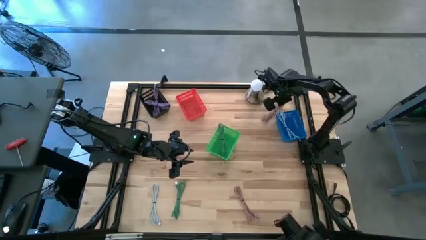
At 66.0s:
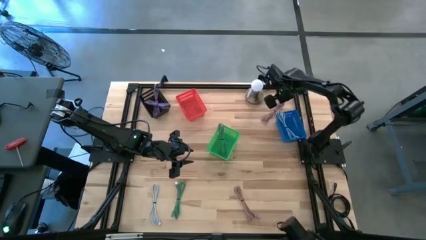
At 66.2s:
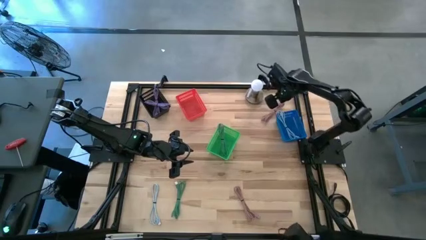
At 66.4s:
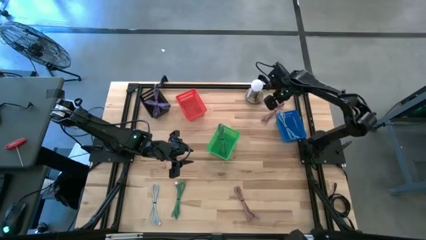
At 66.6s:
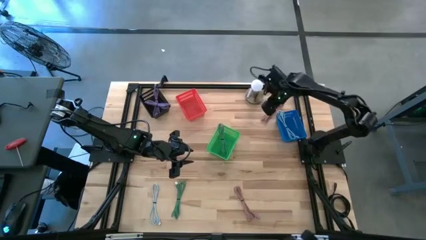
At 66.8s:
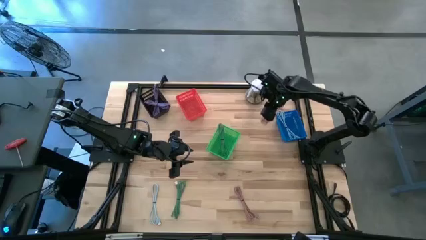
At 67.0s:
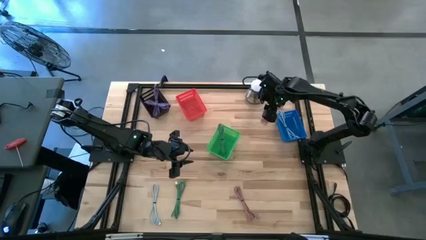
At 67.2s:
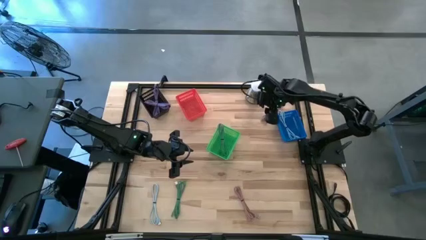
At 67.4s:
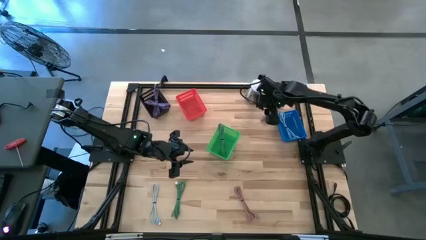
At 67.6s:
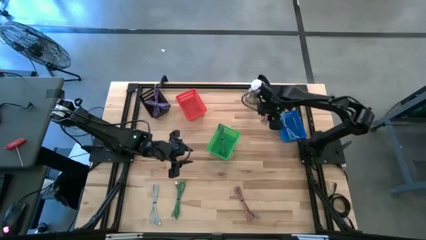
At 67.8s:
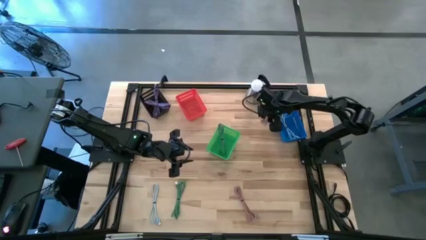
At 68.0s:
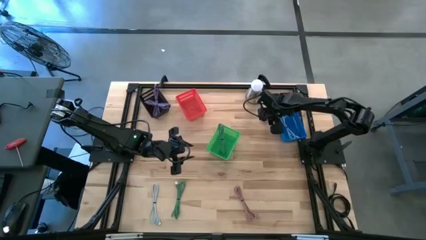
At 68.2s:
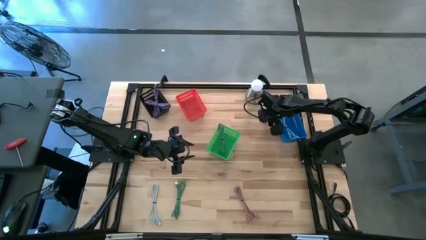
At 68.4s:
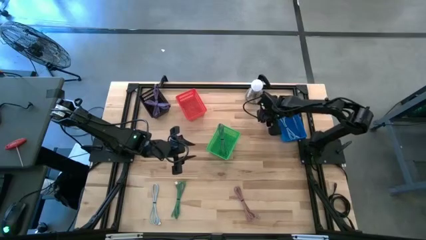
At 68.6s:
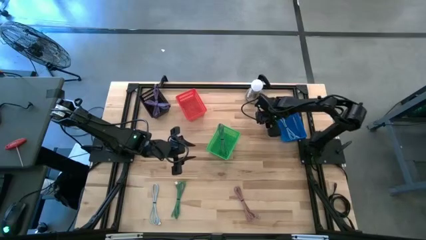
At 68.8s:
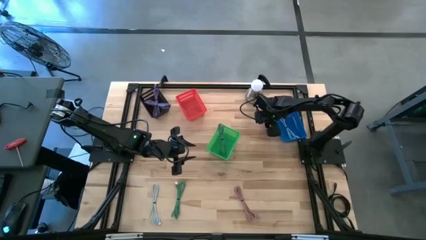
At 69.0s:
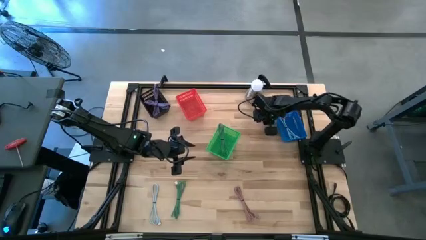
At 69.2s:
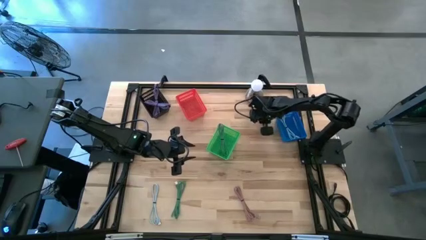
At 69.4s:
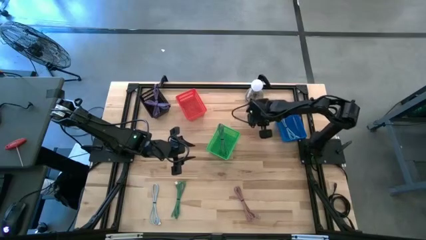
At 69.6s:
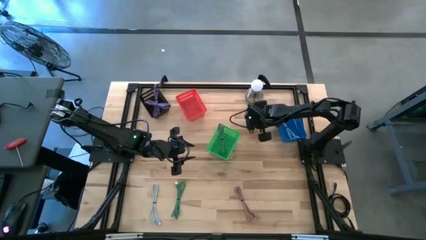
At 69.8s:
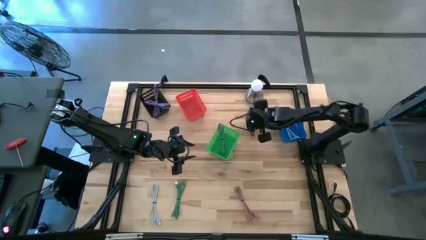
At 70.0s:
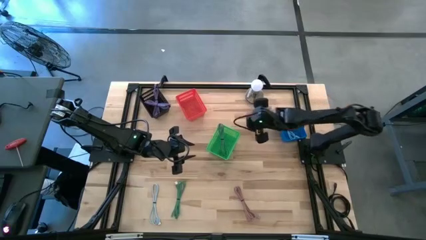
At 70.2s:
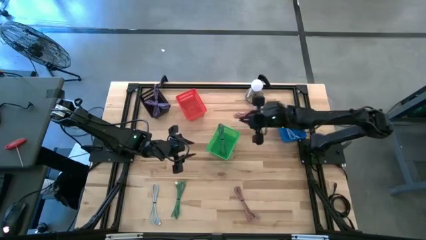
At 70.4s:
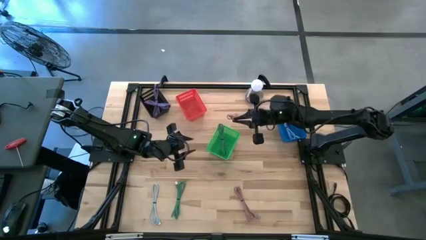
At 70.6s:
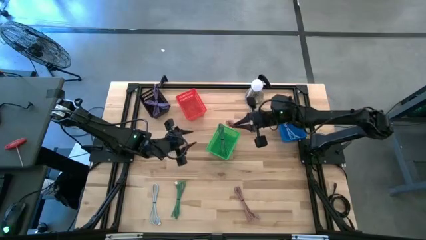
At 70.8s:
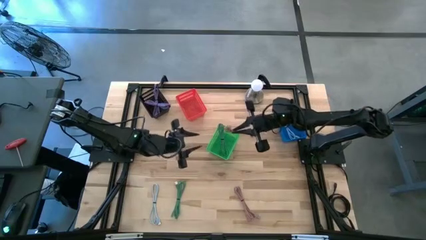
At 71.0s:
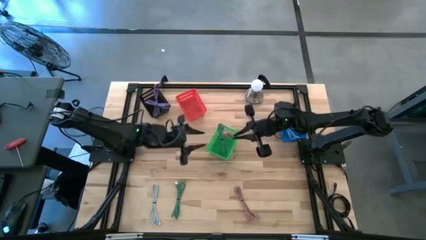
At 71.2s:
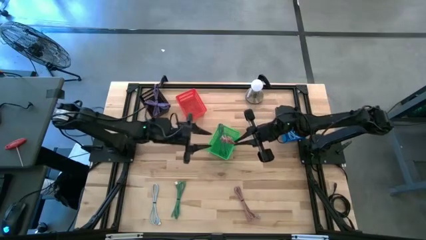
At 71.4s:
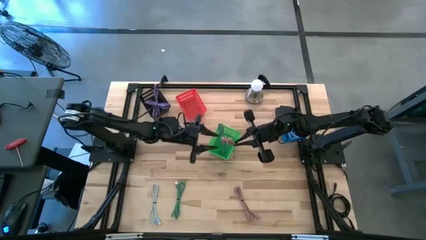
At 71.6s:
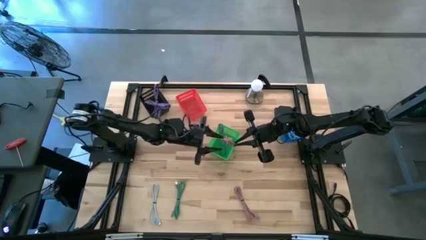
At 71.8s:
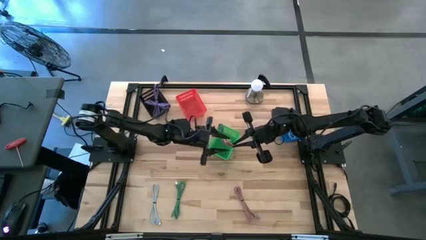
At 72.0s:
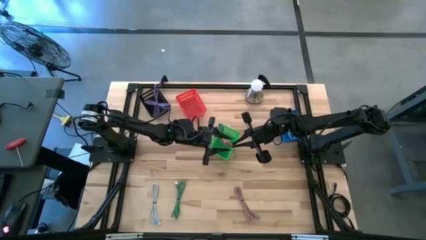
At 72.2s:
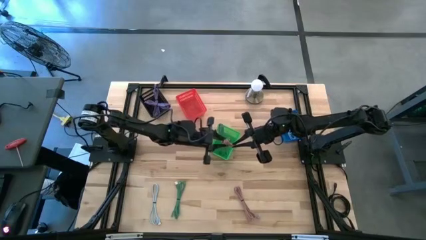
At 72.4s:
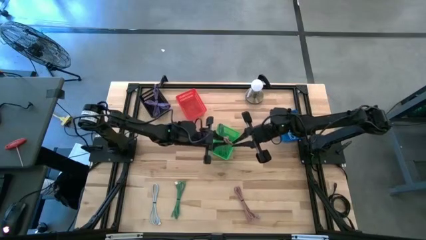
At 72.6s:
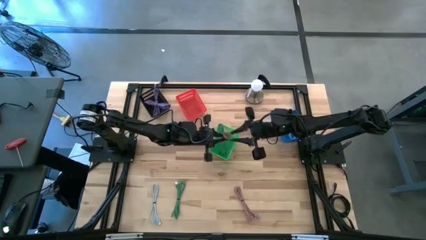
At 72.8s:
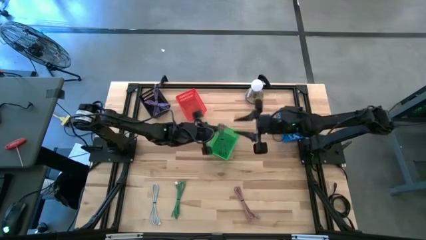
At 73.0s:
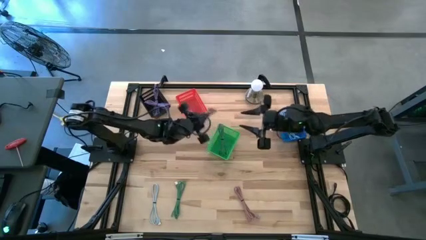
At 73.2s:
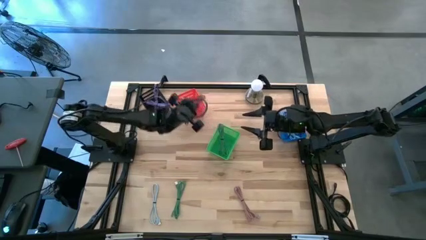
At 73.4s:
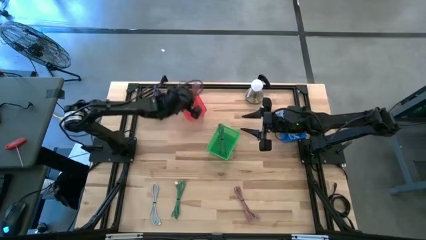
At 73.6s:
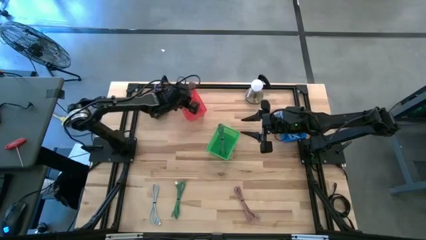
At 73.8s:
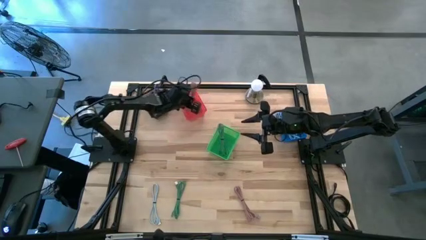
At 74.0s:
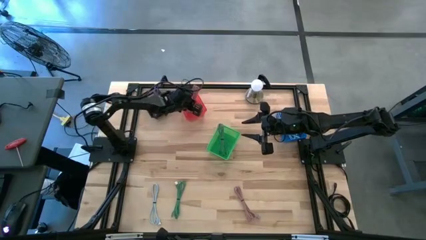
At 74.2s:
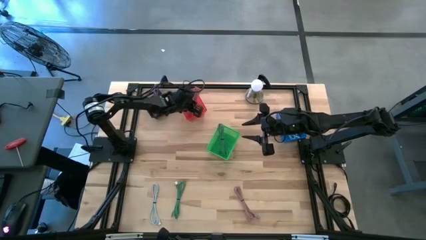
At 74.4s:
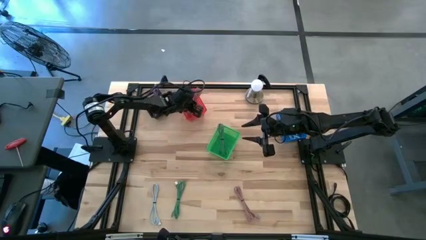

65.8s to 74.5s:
Task: Pick & Place USB Port
Put the top pink charger cable into the red basket

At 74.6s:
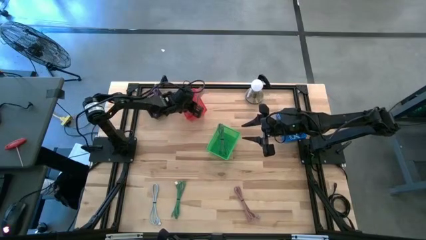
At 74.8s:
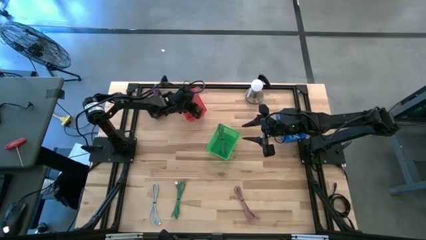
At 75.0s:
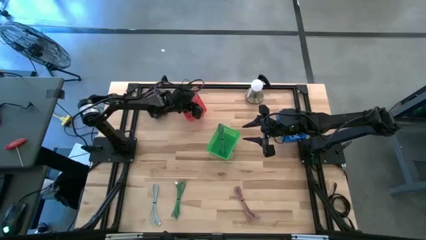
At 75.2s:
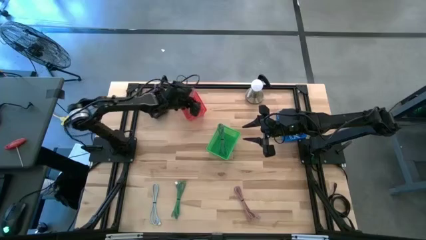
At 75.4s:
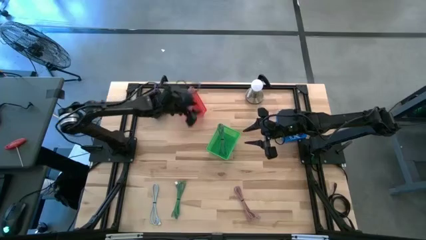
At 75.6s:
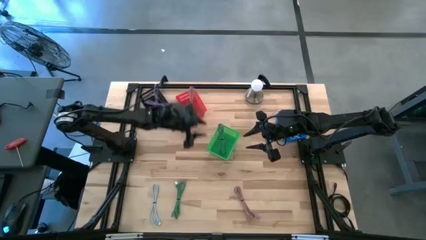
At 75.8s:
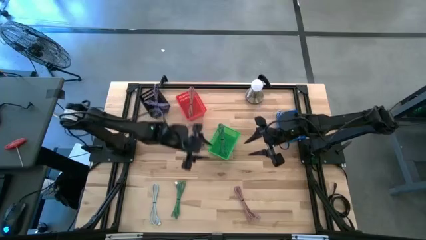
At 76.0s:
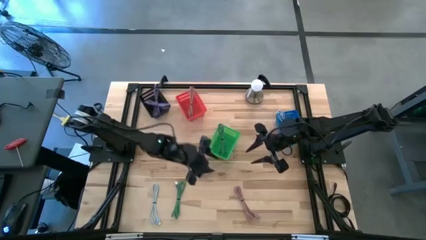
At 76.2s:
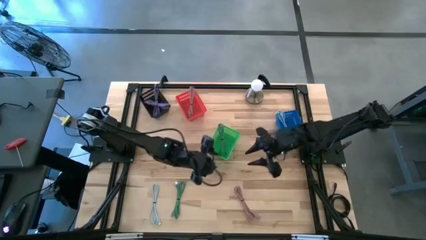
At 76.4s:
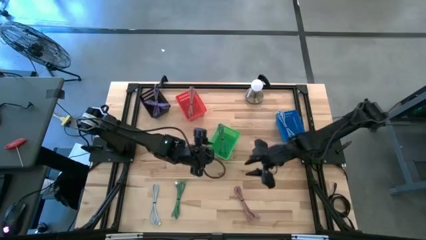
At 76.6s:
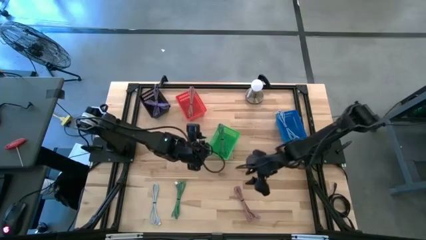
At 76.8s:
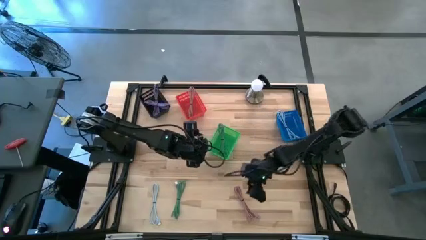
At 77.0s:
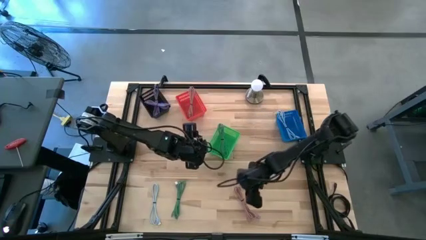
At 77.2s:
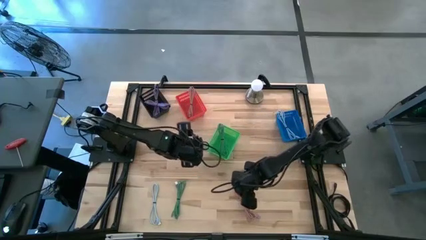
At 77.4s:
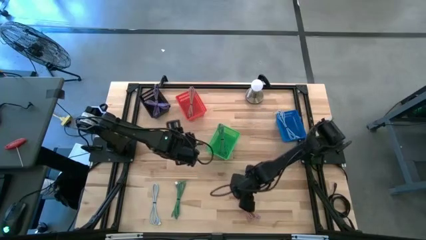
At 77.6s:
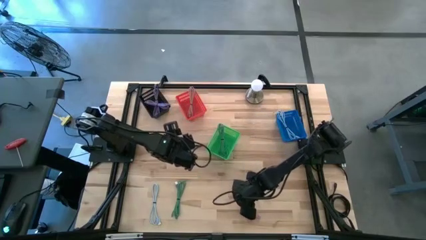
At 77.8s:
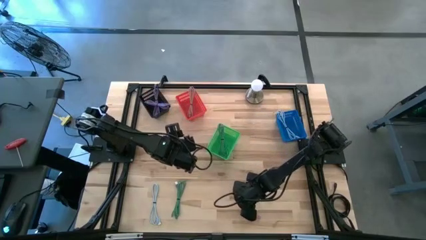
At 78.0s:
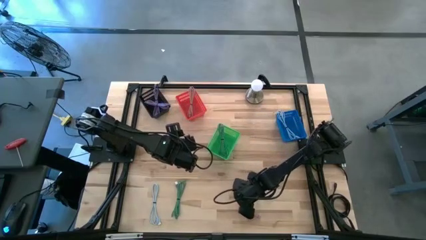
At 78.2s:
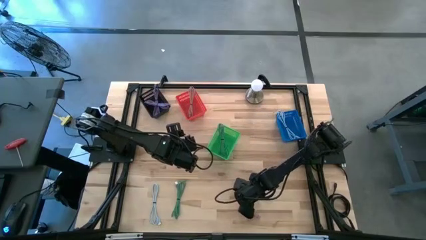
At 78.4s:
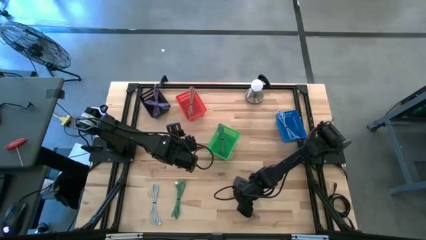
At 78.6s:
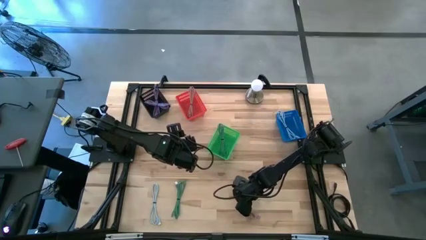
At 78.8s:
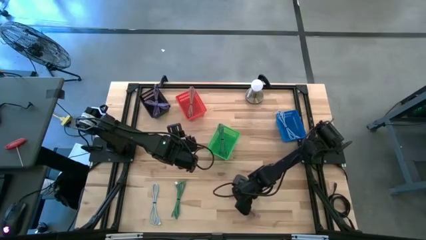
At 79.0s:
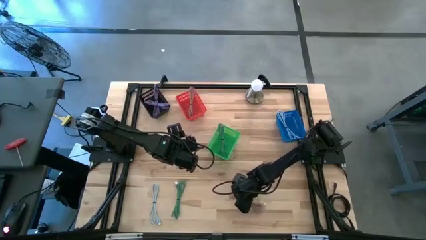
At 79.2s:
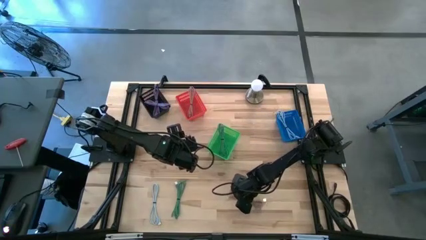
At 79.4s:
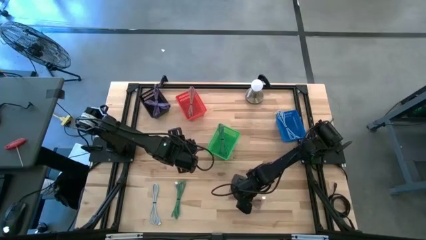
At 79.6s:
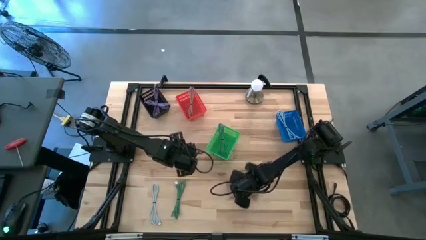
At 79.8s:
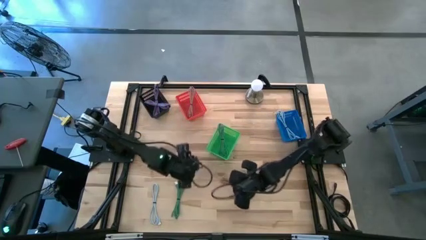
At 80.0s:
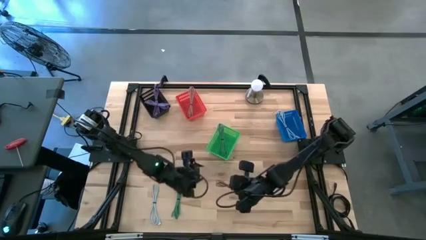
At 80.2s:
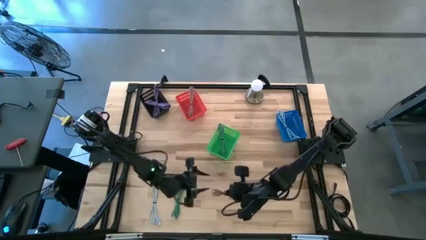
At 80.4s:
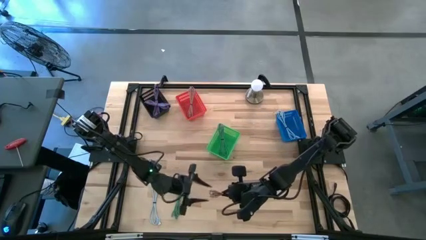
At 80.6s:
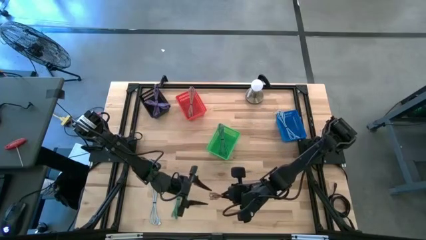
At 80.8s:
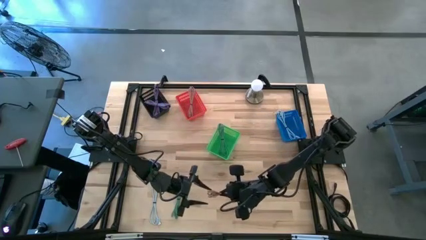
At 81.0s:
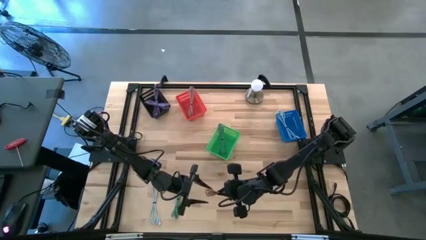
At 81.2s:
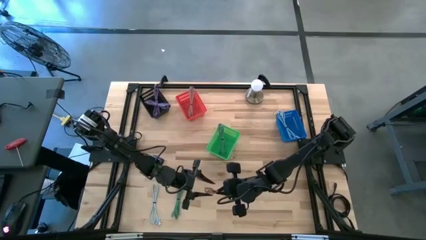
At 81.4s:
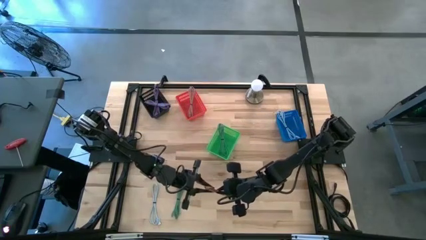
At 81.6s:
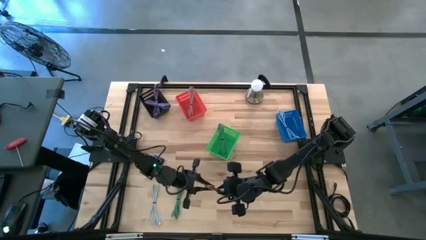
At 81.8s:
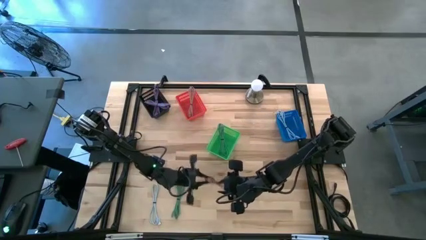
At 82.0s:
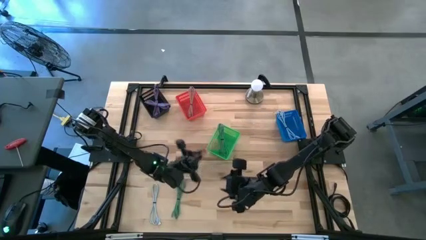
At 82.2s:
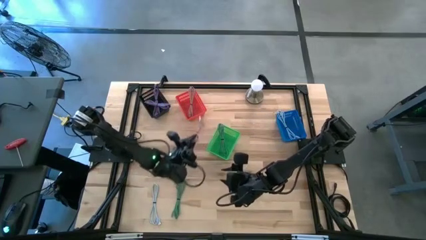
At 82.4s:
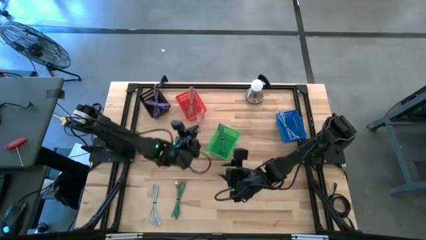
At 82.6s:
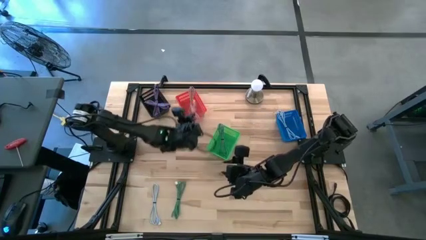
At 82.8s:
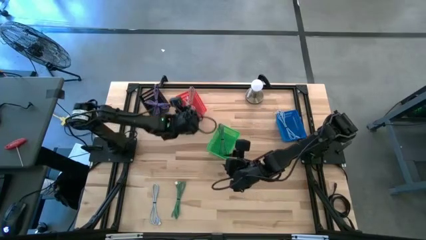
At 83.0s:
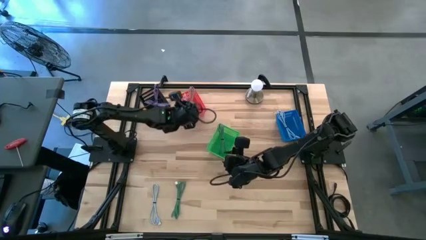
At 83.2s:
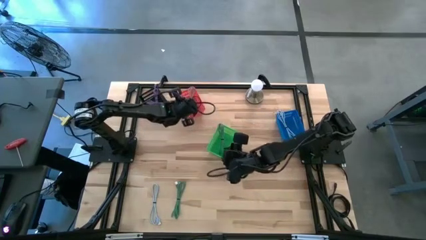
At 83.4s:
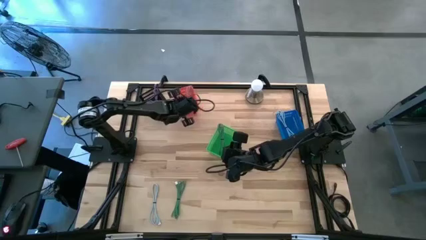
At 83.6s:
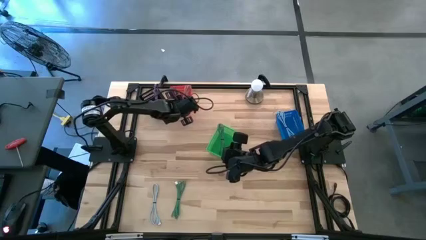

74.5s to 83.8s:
Put the pink charger cable into the red basket
